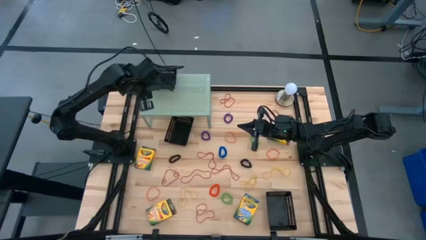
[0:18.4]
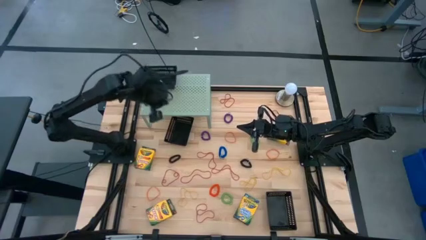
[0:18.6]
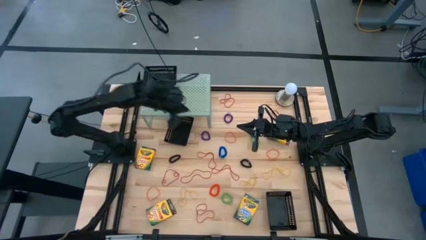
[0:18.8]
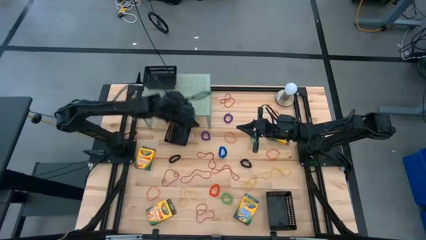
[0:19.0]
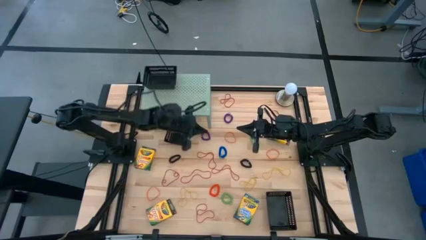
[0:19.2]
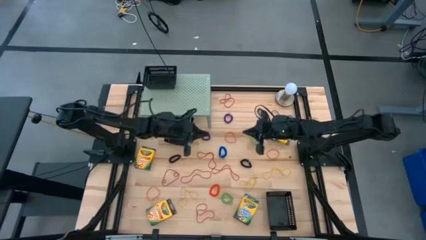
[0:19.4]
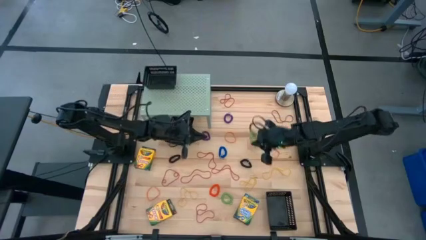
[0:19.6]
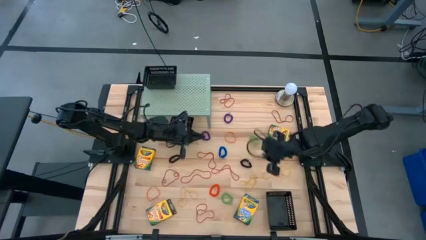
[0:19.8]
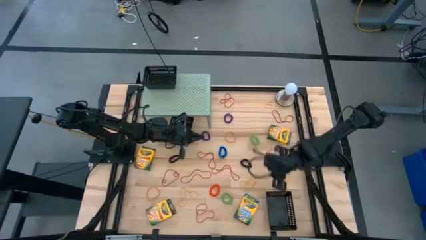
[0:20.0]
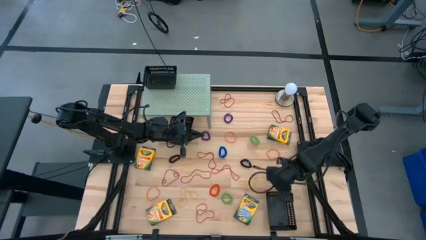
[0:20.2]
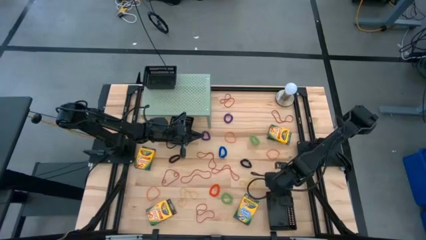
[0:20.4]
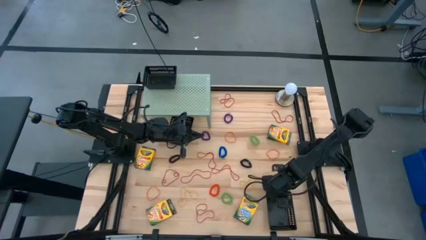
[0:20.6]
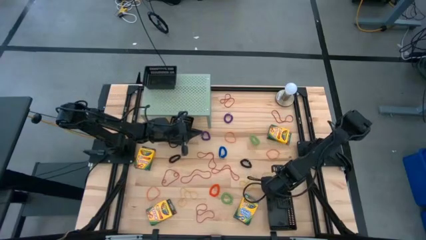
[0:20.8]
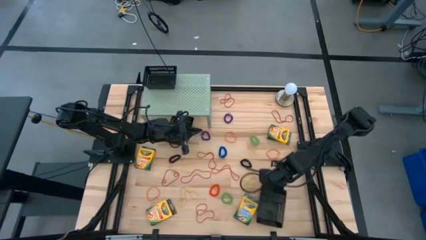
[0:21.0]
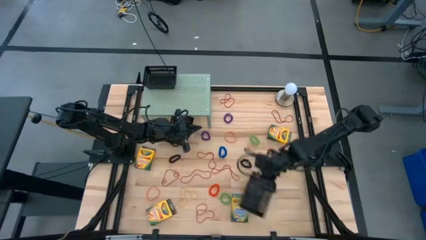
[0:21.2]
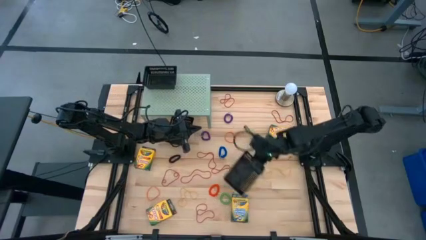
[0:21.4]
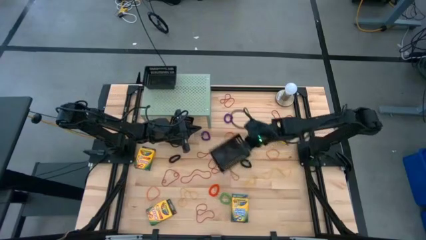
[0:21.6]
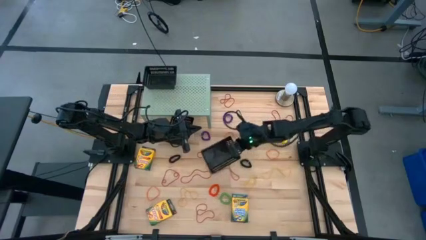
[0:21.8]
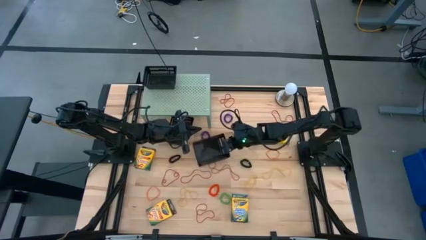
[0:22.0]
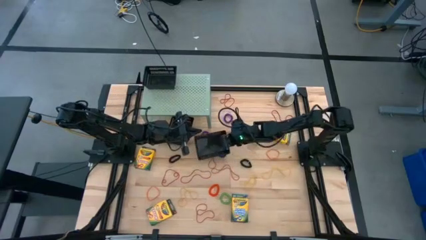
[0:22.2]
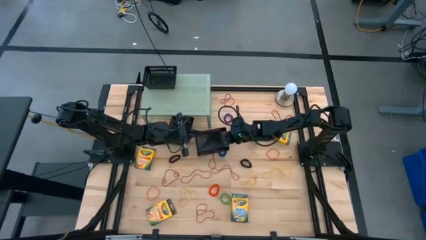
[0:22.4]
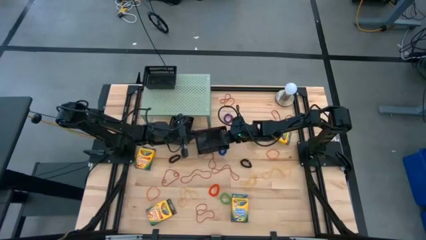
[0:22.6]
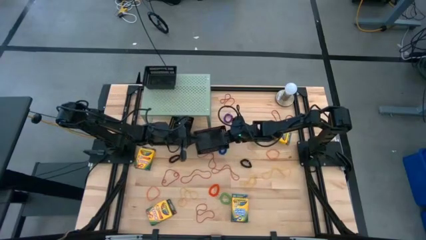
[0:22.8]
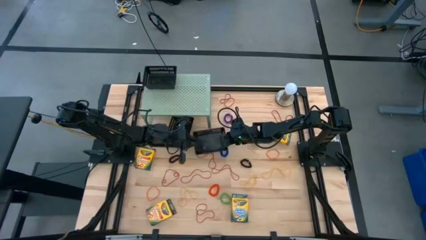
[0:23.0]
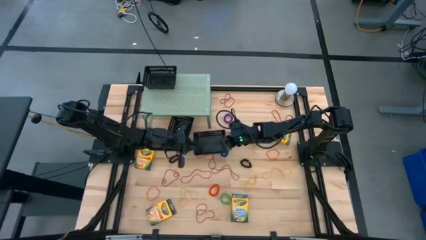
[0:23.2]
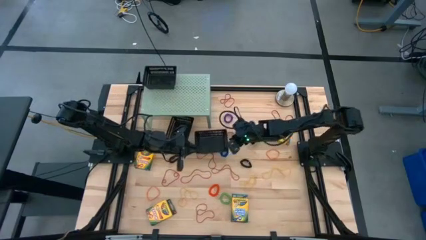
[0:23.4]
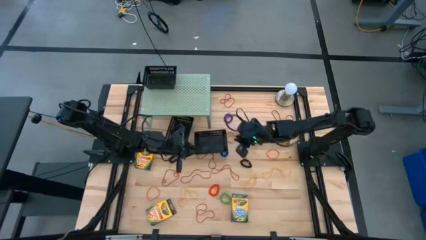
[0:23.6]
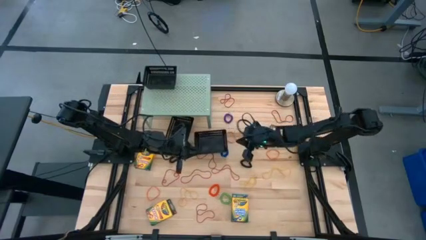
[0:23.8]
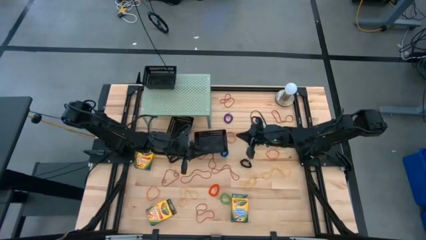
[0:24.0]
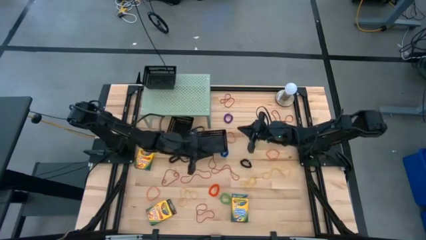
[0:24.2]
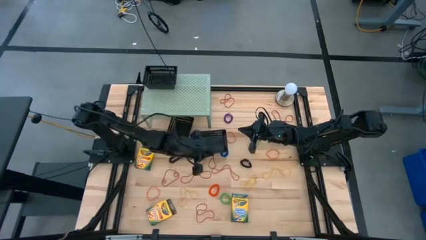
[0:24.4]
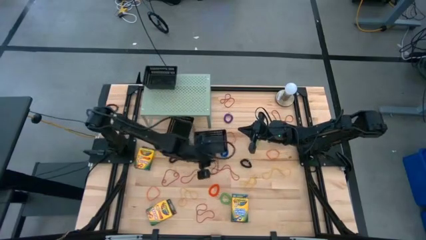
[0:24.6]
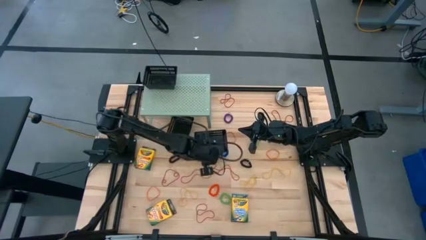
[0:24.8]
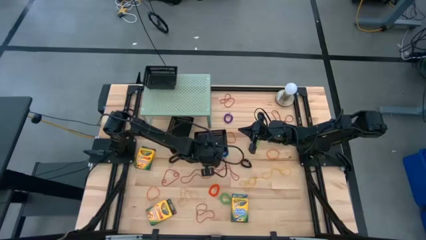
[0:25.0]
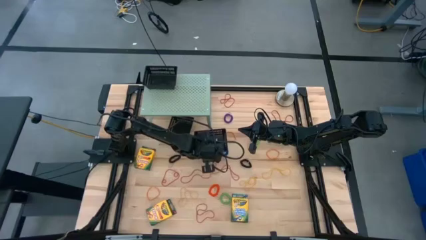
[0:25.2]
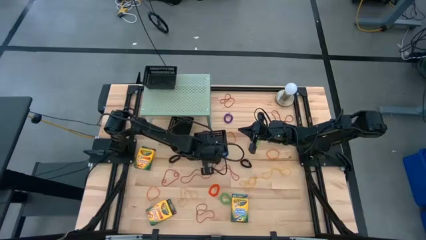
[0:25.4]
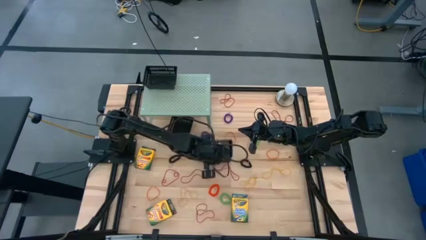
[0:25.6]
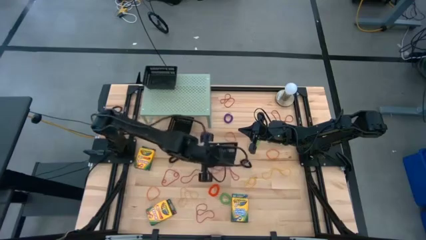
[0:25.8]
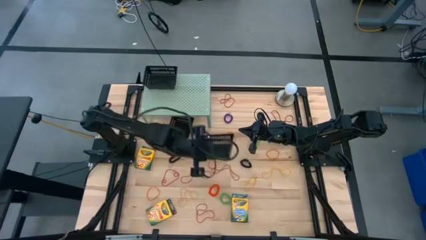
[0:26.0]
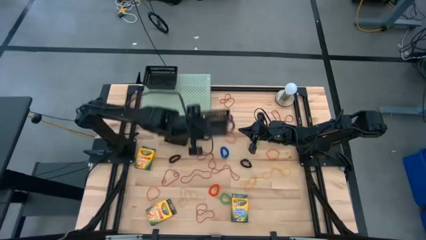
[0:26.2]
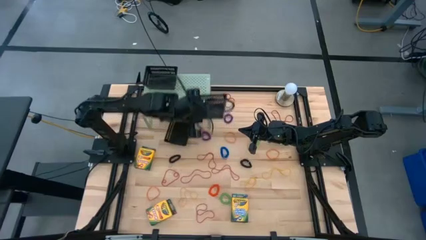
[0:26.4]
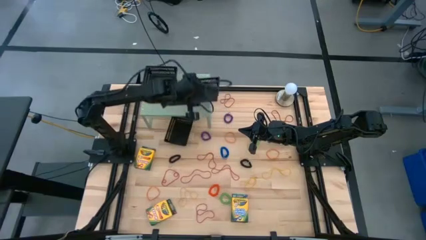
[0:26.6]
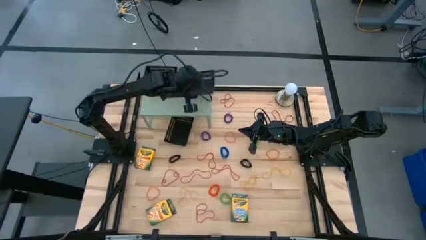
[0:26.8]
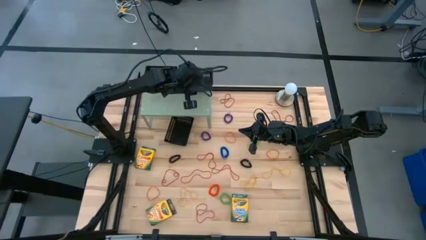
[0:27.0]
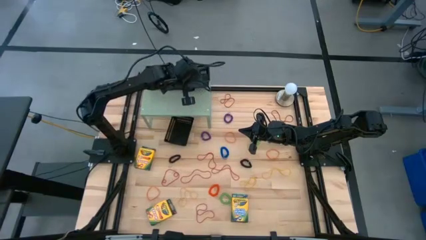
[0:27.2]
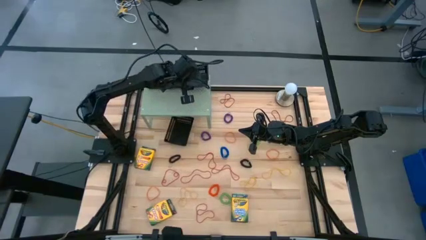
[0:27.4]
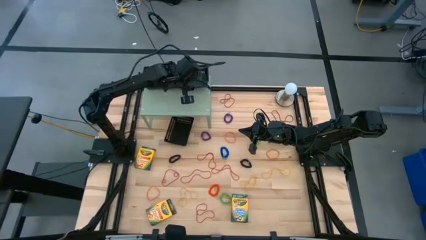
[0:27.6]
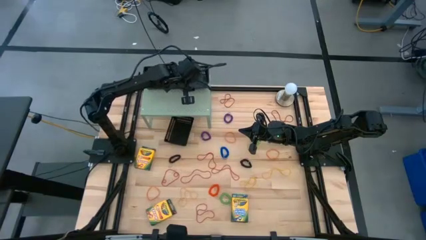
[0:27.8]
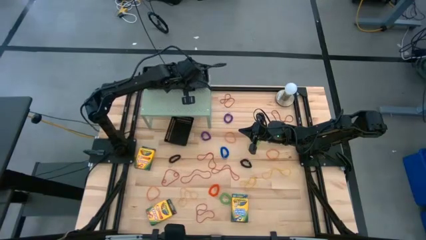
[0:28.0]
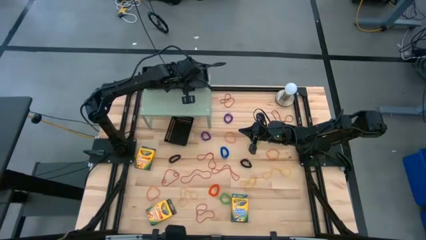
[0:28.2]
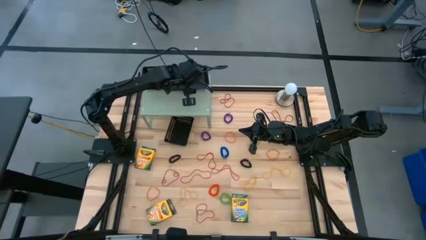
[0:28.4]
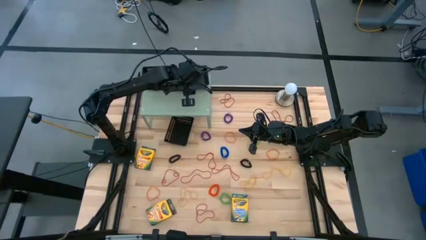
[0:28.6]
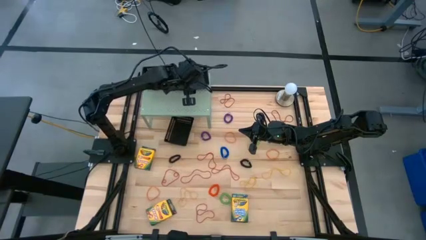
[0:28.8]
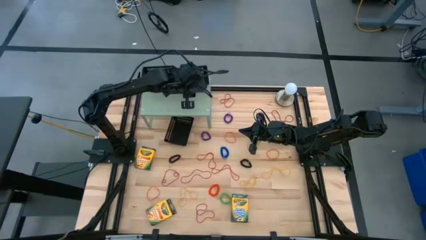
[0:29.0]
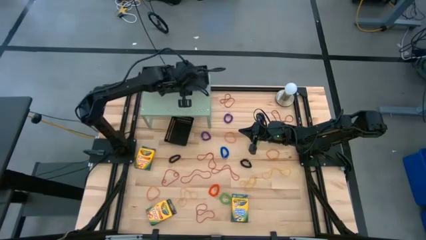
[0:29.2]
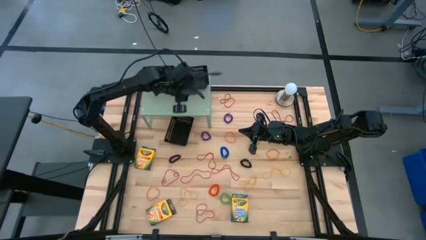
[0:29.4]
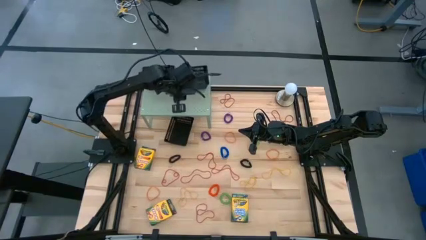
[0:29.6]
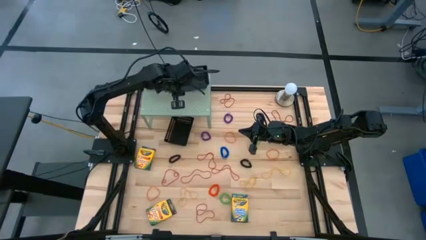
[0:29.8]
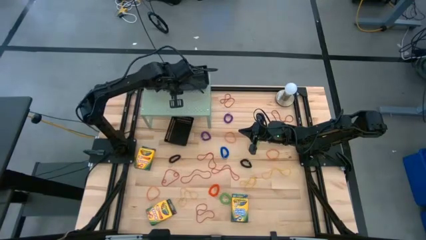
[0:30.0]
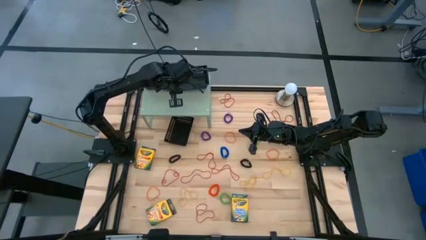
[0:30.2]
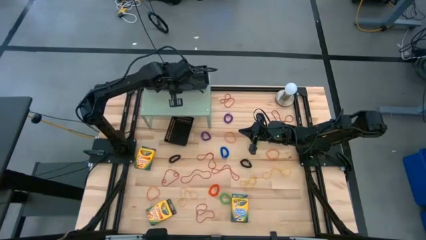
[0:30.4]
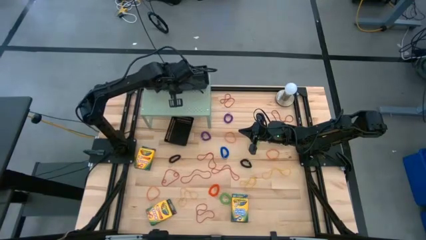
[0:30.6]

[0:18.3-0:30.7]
Task: Pick & Place Office Desk Supplies
Put the bottom black bin on the shelf
